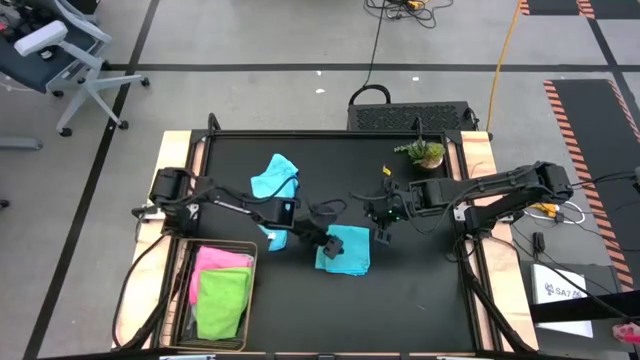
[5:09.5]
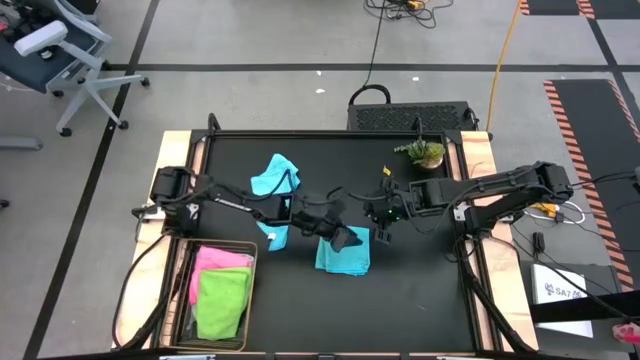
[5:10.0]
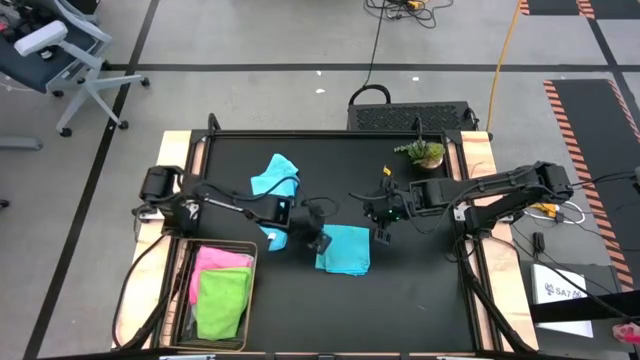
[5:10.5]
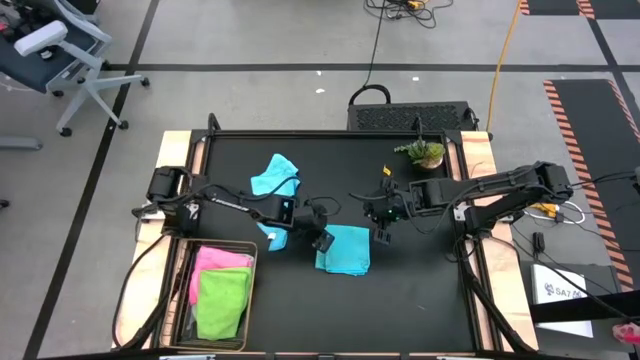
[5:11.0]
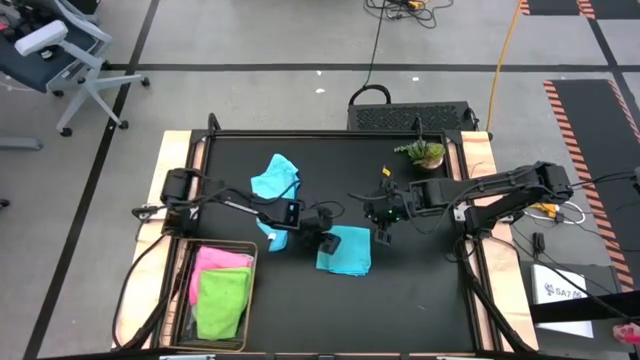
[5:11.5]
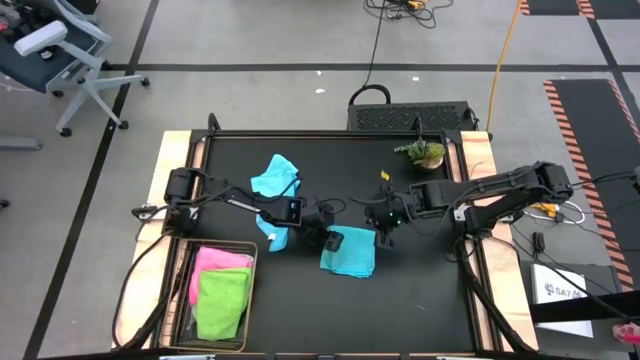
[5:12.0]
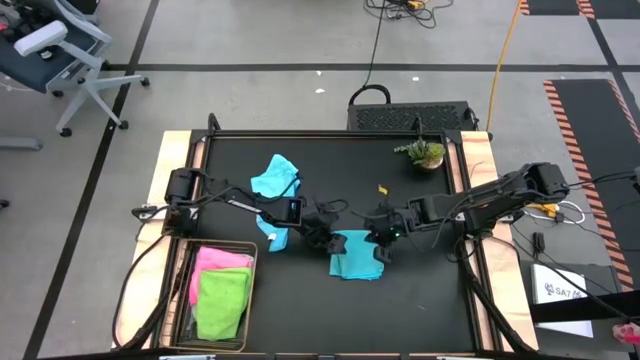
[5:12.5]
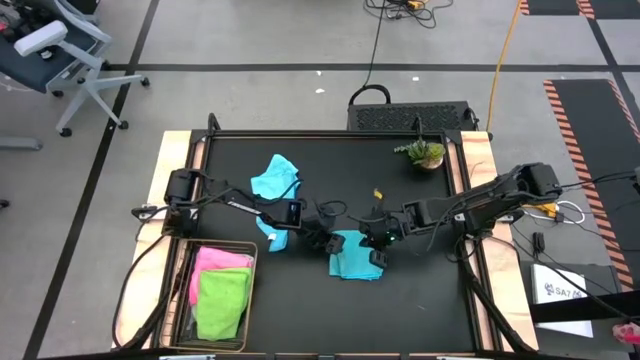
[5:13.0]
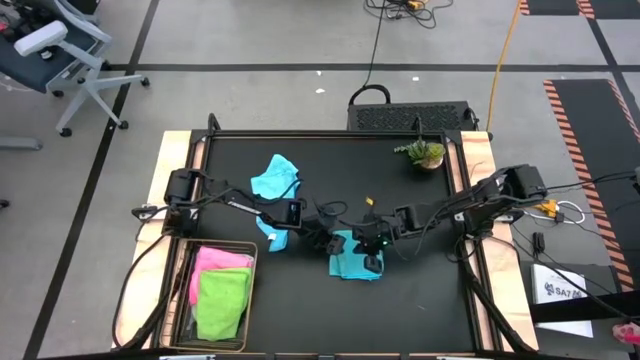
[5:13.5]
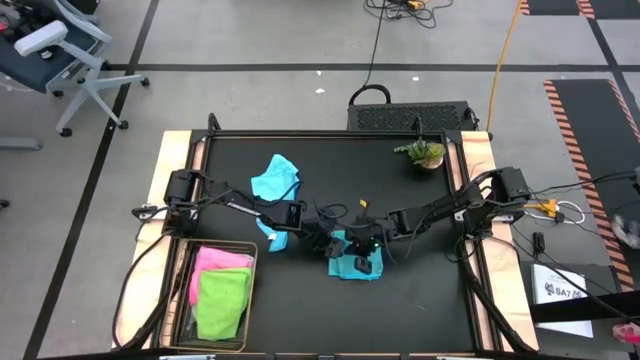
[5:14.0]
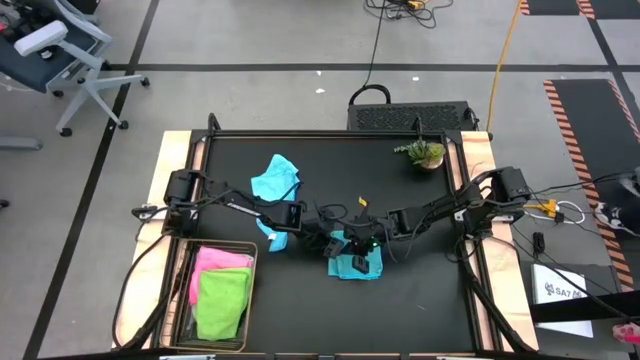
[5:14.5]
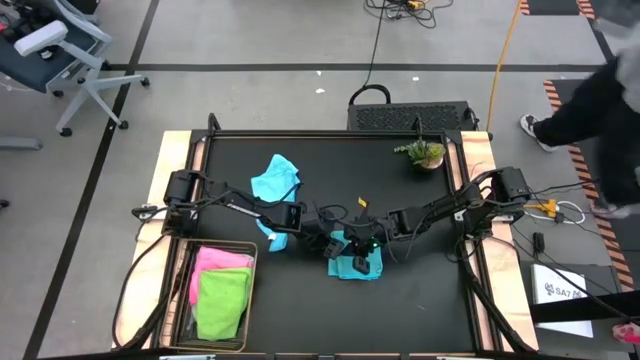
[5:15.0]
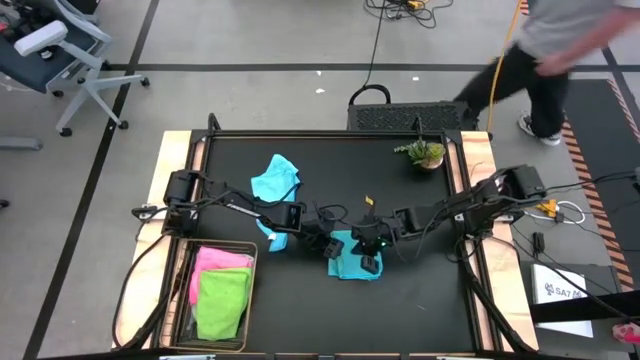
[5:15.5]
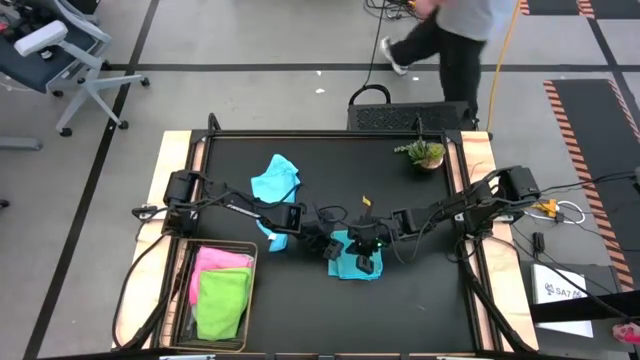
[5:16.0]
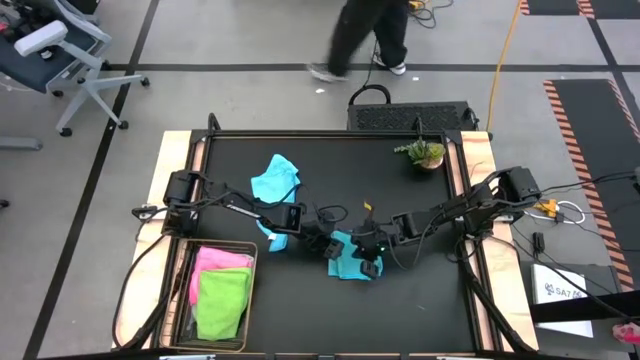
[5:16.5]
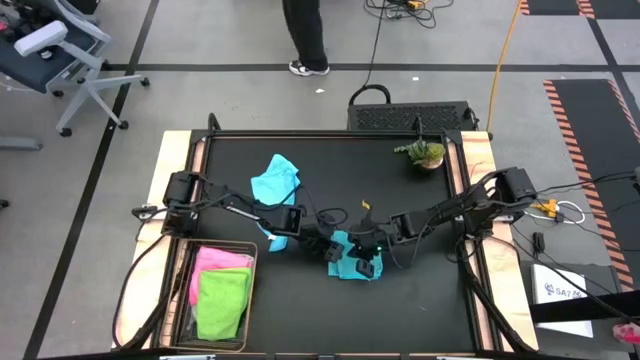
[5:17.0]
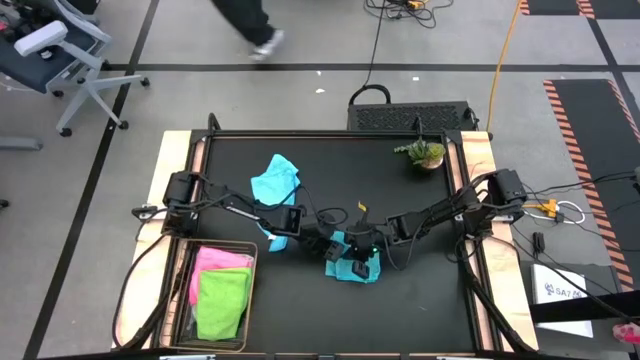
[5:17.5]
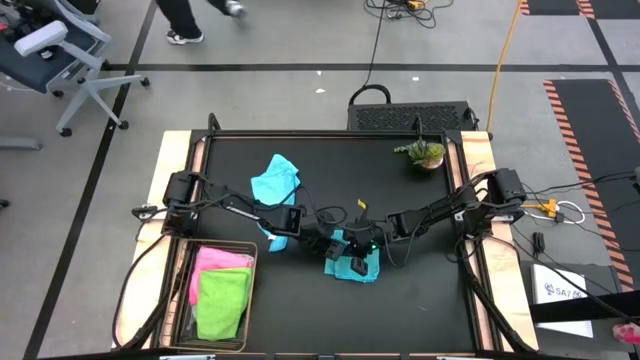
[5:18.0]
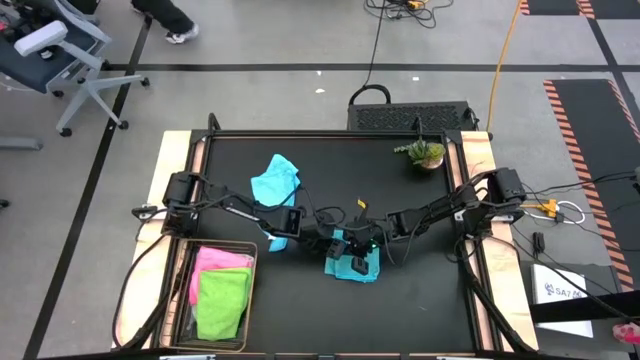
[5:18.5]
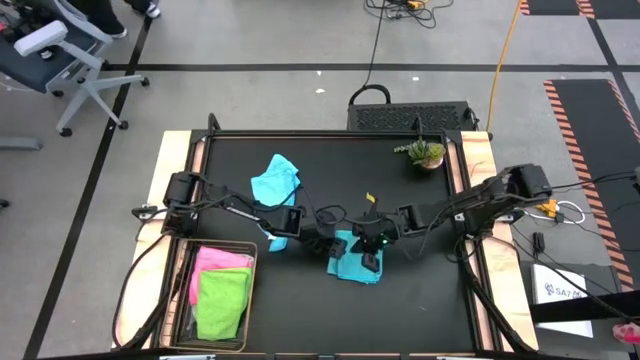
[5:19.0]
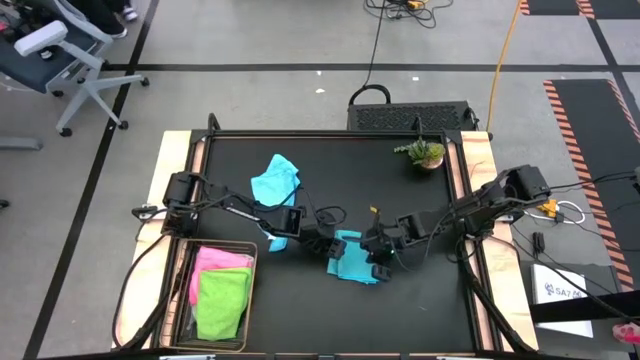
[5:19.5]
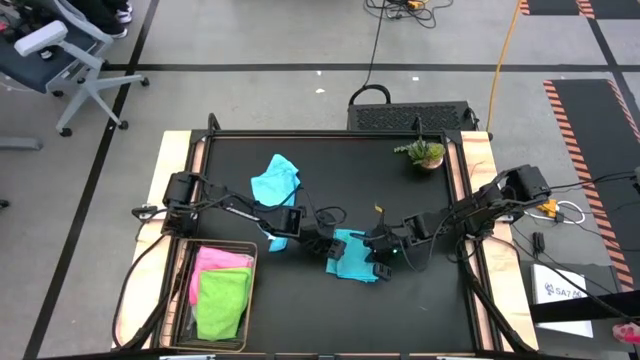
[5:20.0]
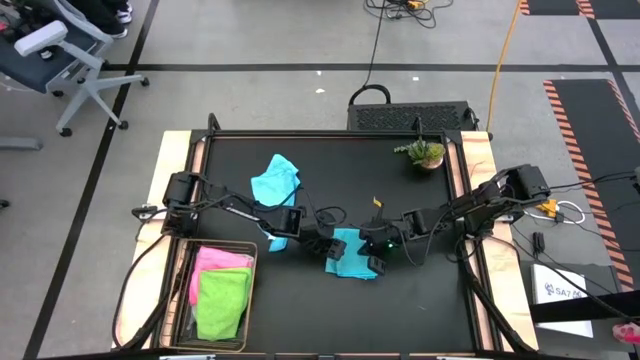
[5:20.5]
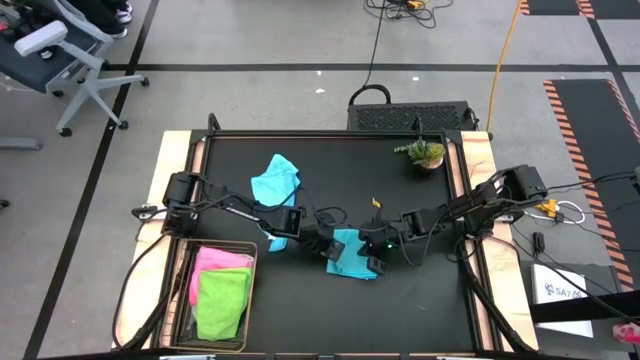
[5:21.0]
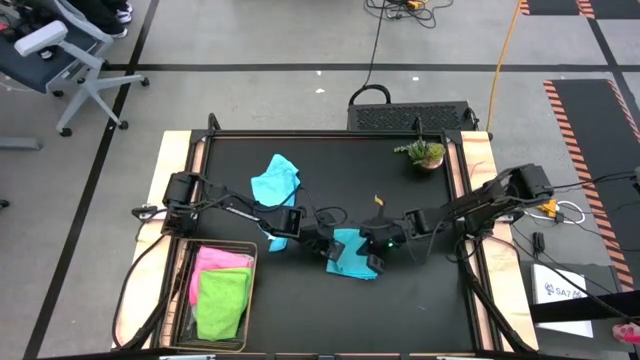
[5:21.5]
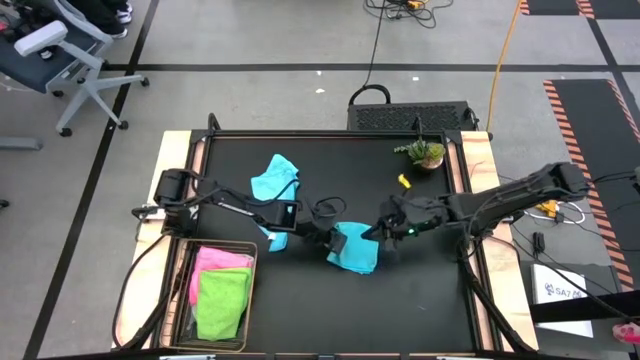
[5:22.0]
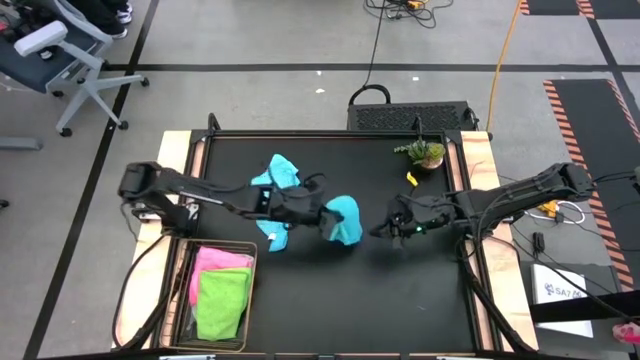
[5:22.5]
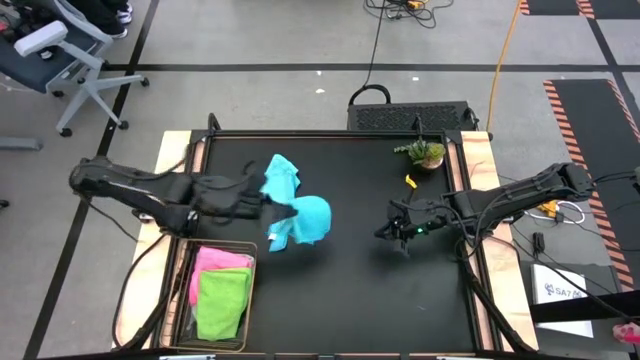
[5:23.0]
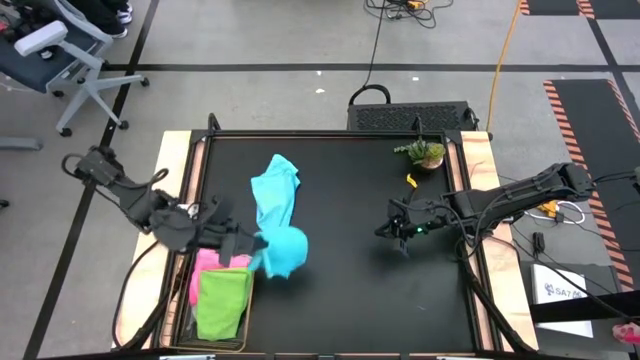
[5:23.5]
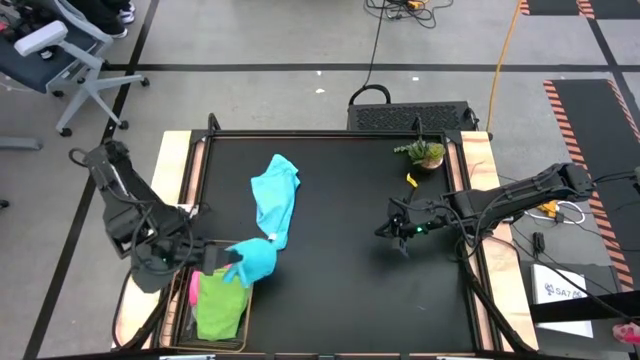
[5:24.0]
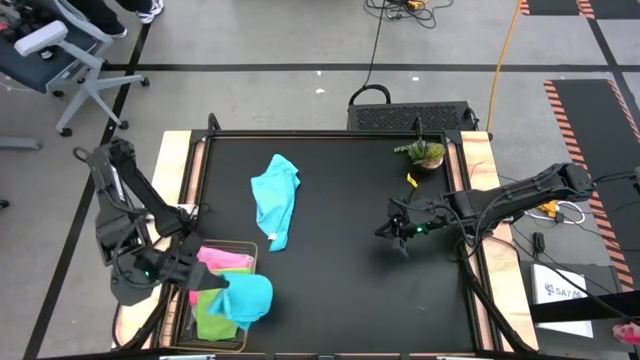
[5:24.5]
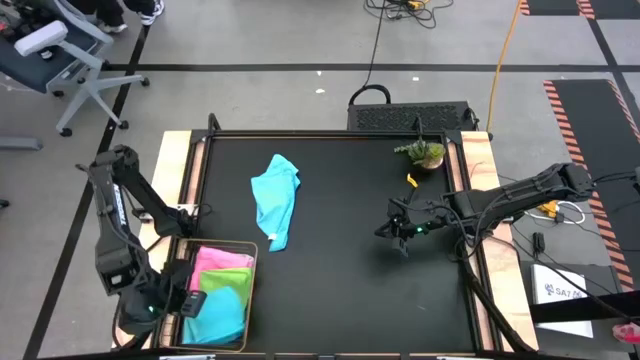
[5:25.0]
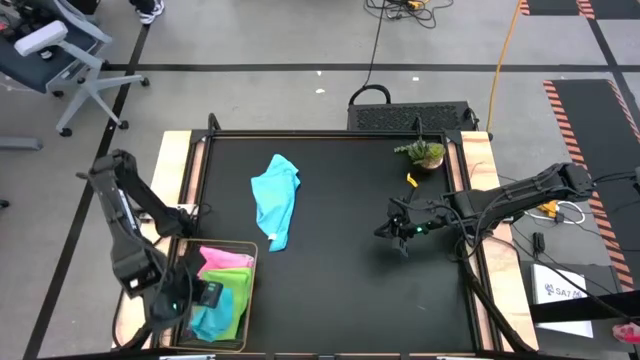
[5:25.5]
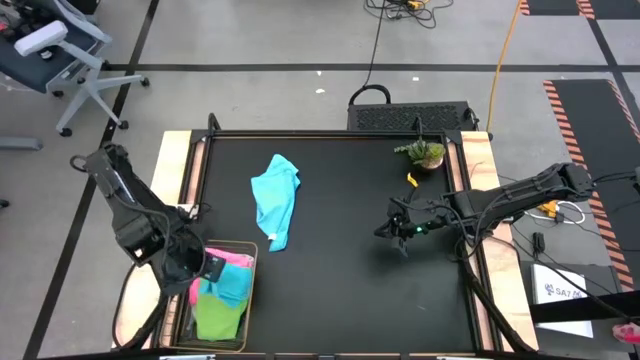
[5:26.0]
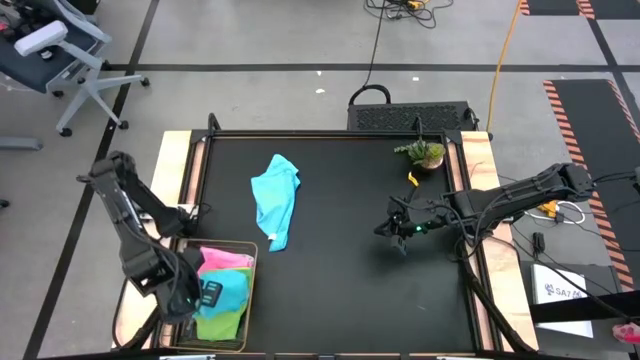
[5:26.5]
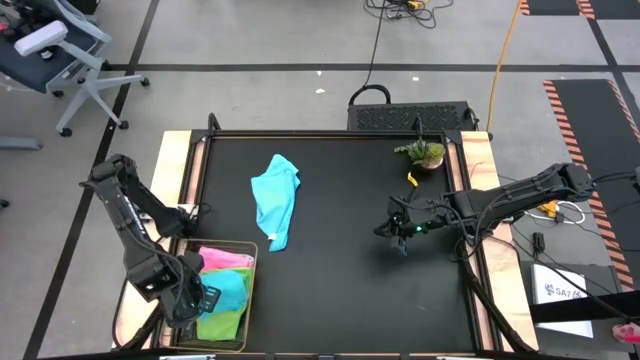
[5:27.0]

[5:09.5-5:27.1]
Task: Fold microfiber towels
Put the right folded blue microfiber cloth into the wire basket

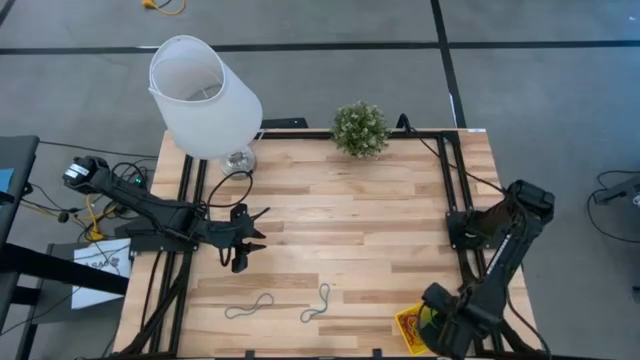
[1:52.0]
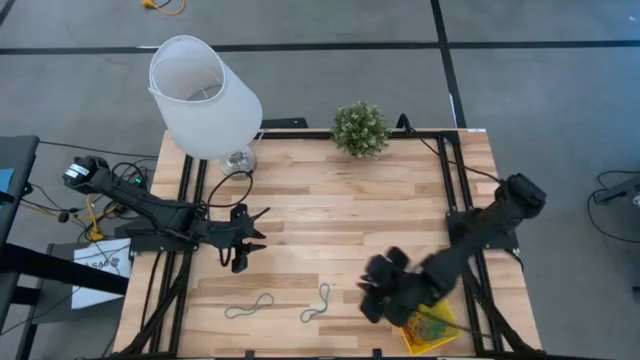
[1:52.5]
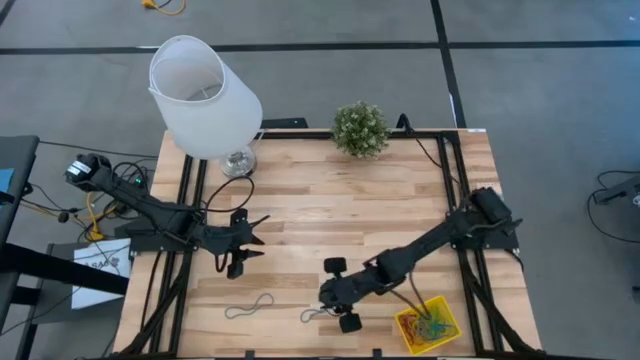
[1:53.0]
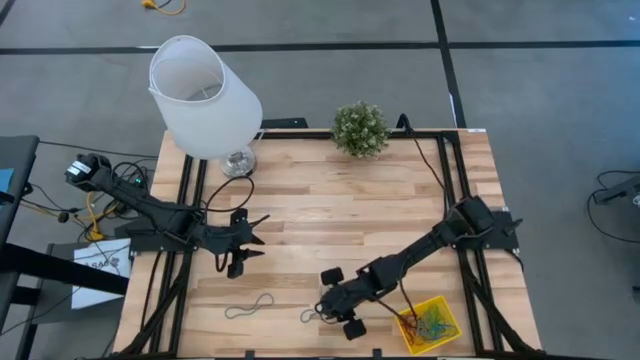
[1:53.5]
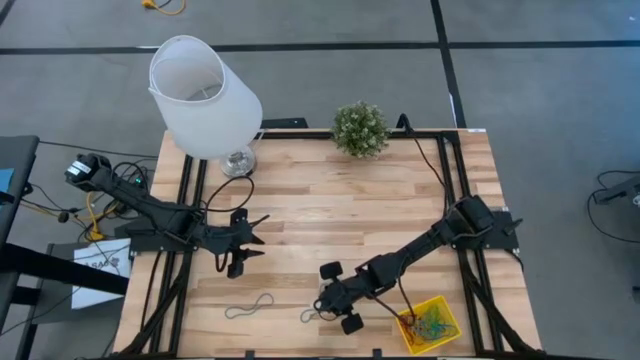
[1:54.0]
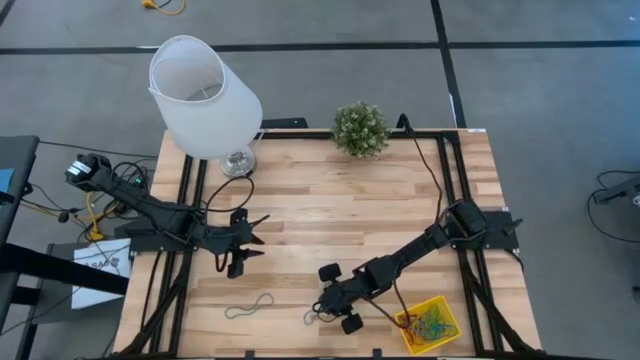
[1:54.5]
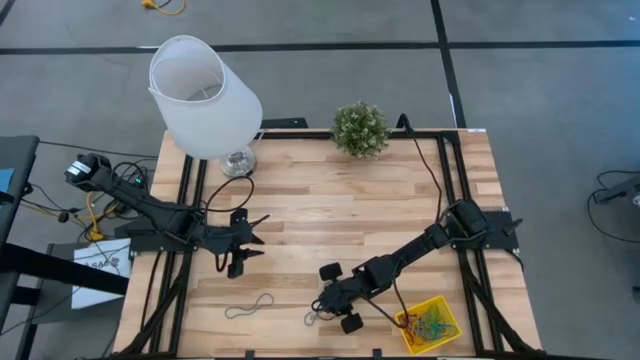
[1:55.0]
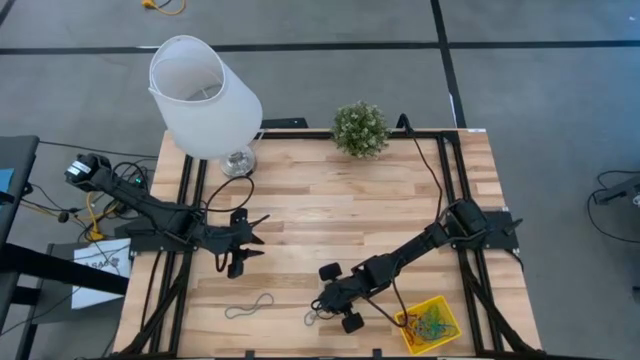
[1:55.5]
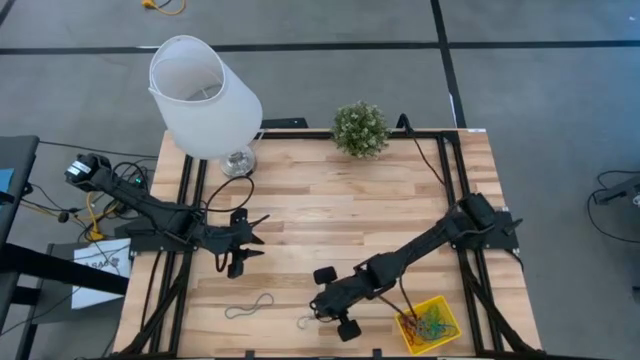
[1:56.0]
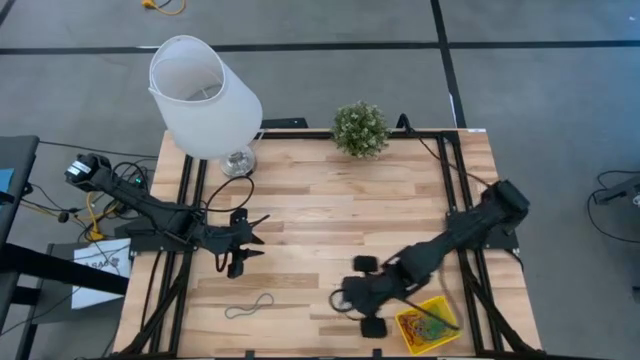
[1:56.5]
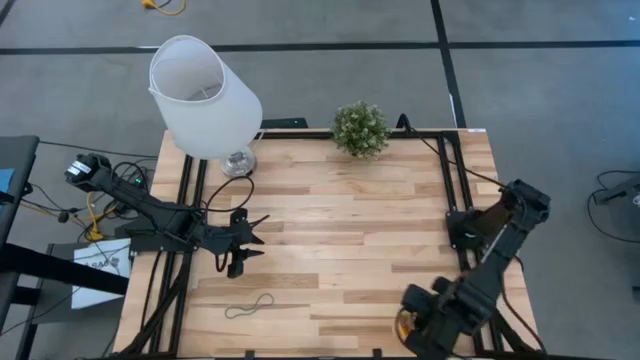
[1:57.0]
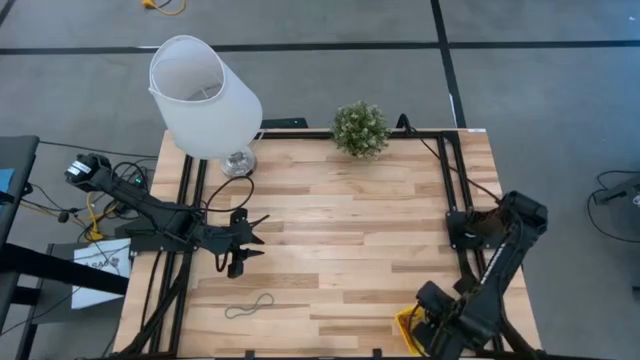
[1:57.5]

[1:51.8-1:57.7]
Task: Pick and place rubber bands into bin
Put the blue rubber band into the yellow basket
